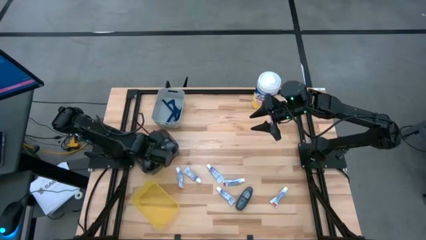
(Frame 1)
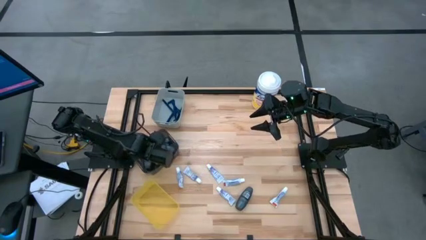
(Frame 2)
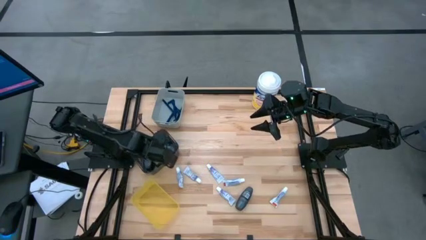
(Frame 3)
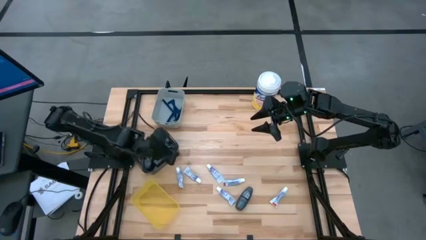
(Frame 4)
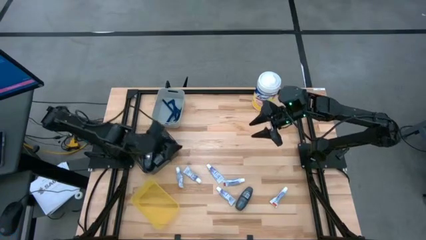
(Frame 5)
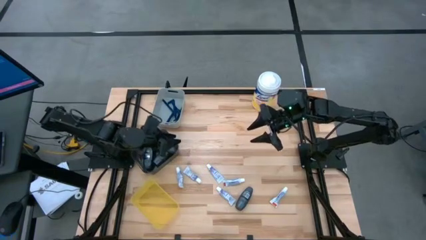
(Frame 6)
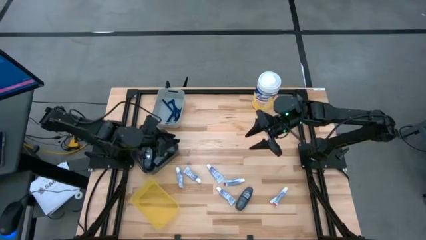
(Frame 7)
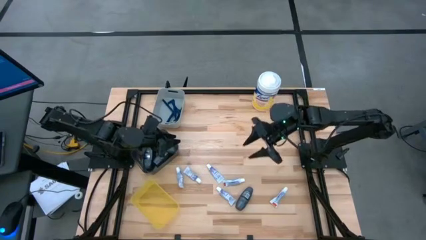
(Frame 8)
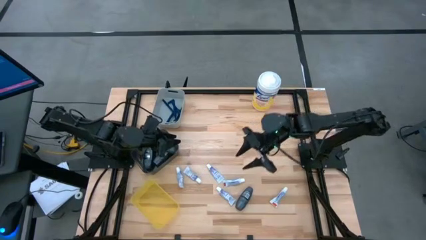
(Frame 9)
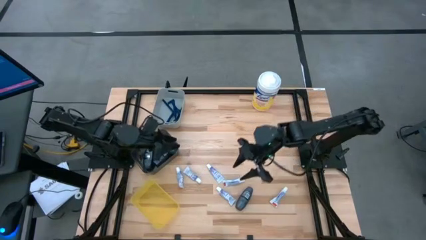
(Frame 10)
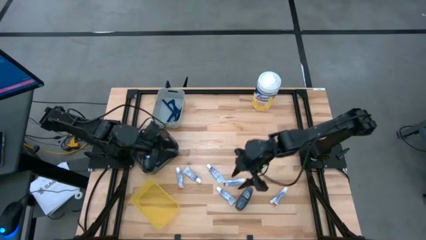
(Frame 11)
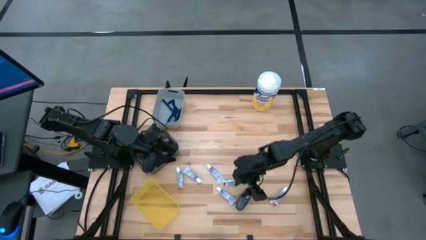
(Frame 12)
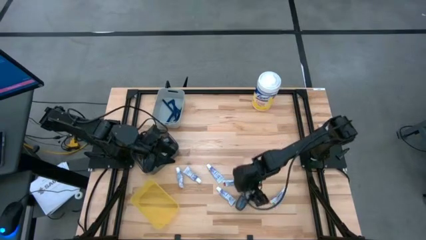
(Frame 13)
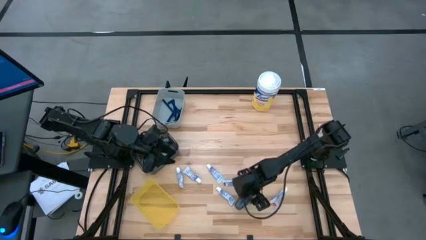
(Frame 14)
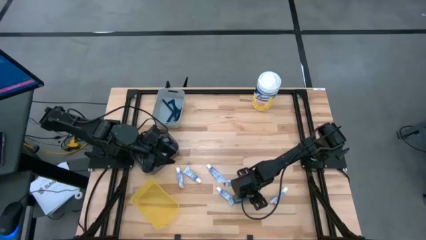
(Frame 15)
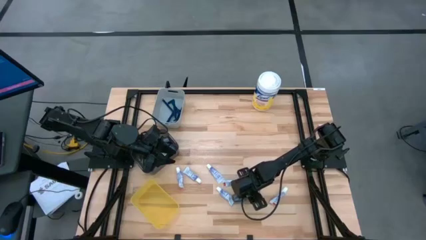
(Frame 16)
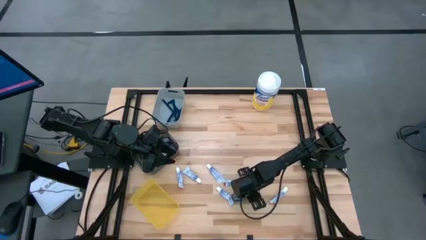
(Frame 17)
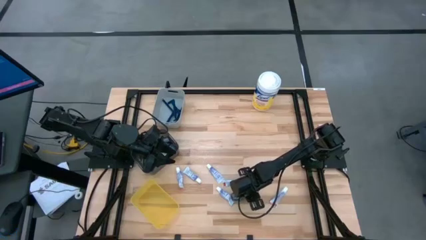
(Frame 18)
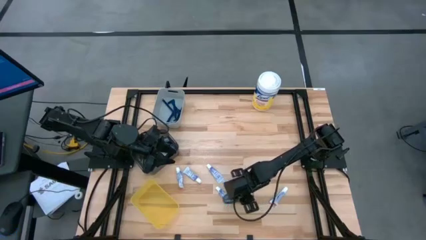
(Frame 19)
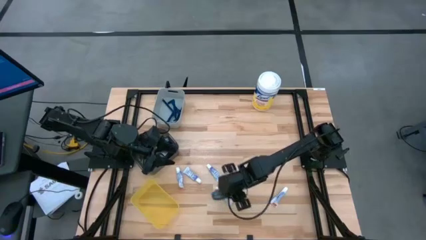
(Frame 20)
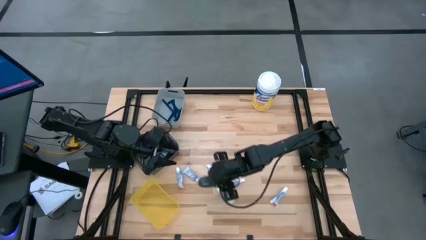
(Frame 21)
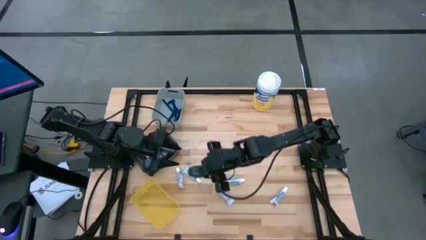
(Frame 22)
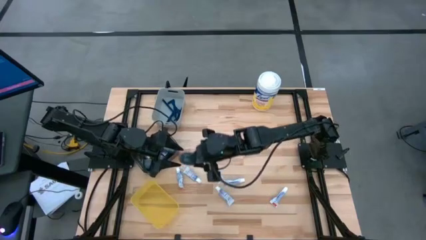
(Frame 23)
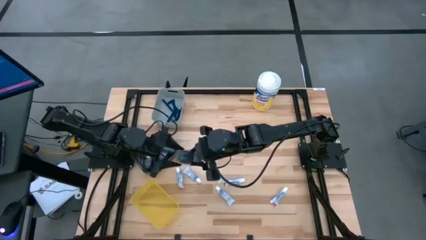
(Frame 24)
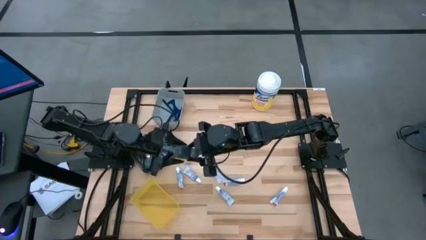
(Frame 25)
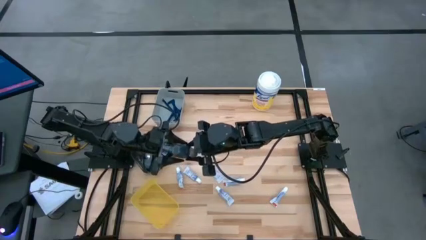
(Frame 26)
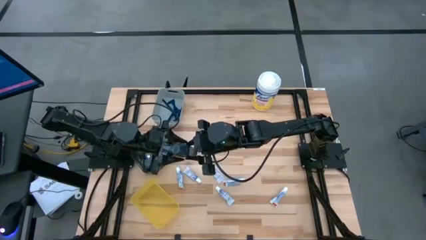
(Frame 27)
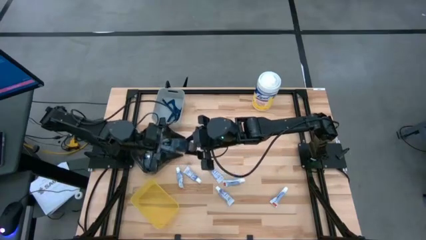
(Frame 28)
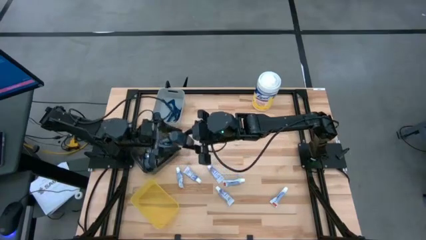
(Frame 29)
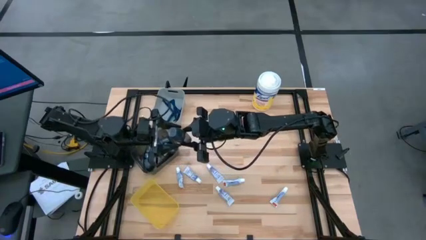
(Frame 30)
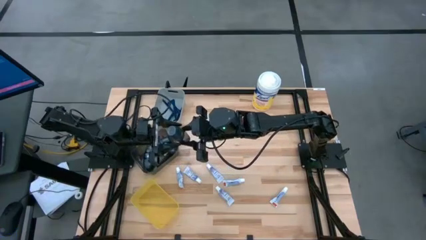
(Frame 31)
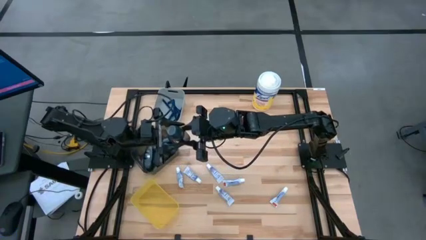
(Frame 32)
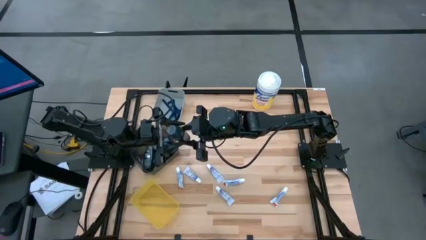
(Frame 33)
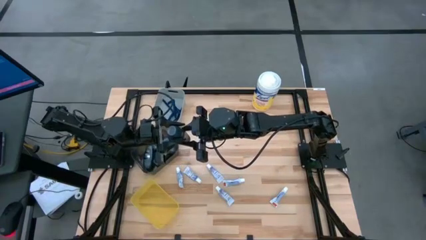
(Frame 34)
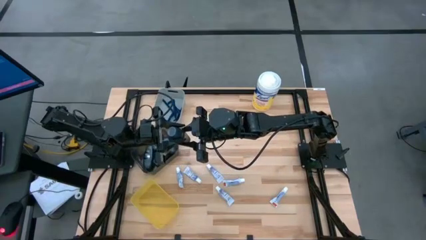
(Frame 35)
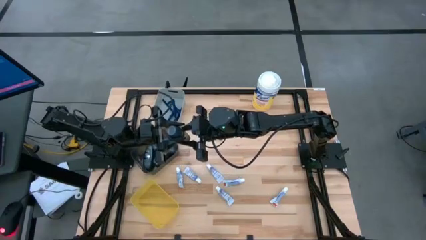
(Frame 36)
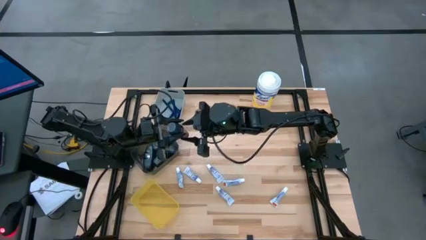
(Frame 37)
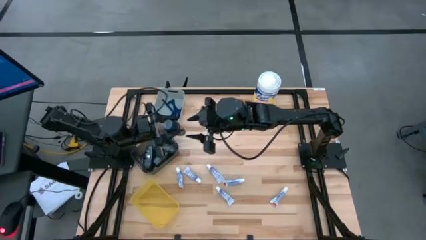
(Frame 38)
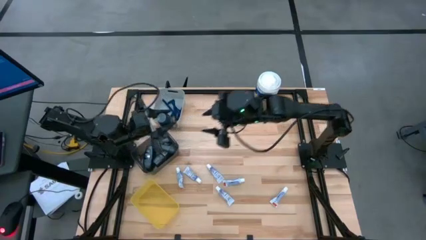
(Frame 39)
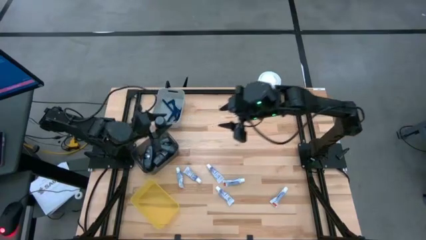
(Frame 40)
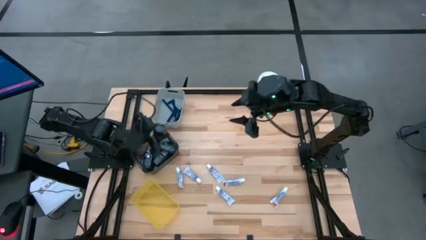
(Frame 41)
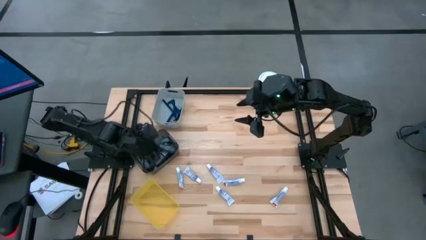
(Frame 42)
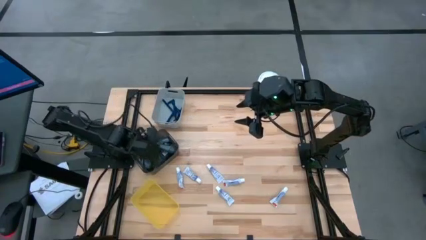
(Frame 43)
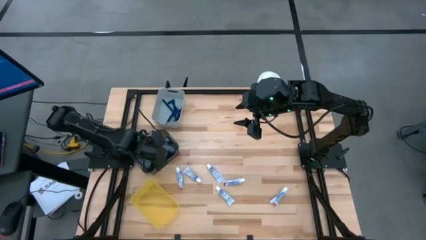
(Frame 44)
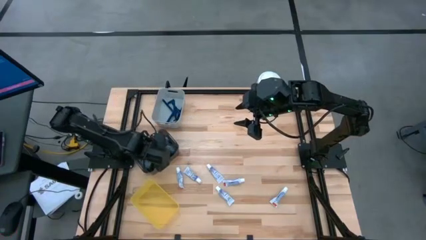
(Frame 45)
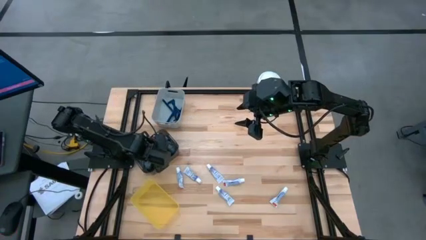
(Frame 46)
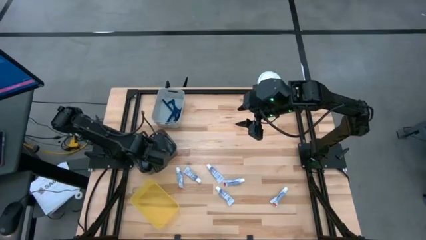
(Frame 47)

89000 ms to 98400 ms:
Task: Pick & Place Travel size toiletries
Put the deodorant into the black bin

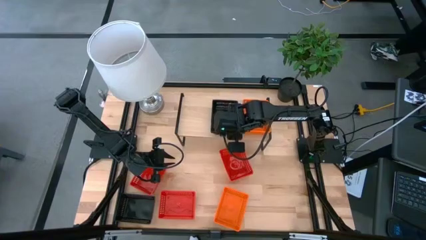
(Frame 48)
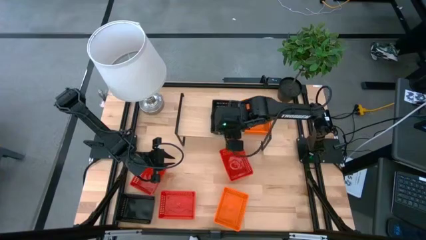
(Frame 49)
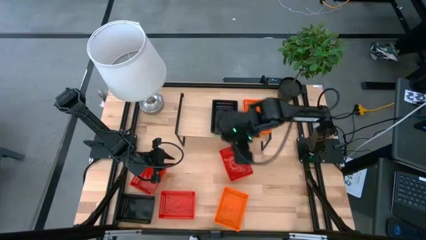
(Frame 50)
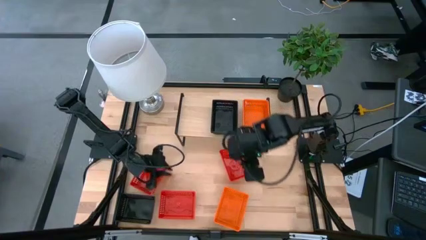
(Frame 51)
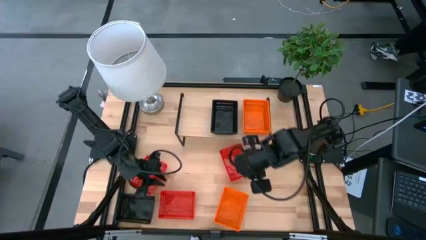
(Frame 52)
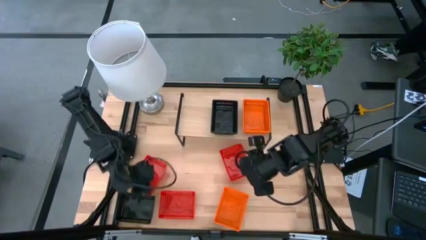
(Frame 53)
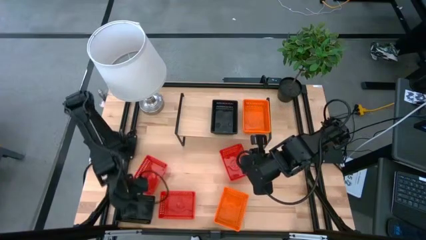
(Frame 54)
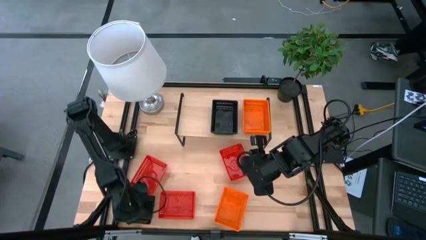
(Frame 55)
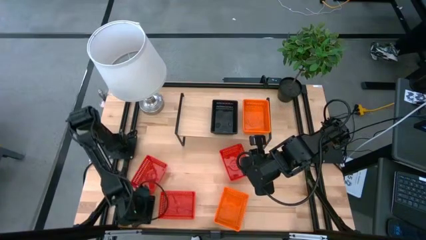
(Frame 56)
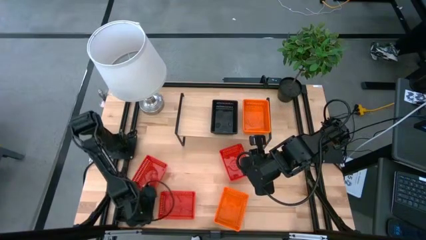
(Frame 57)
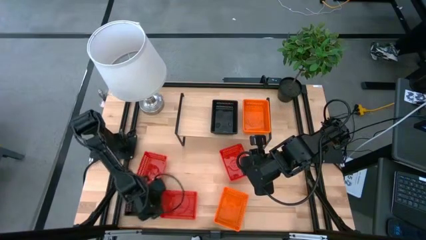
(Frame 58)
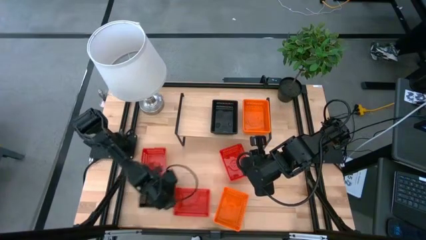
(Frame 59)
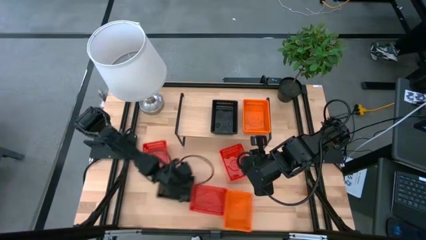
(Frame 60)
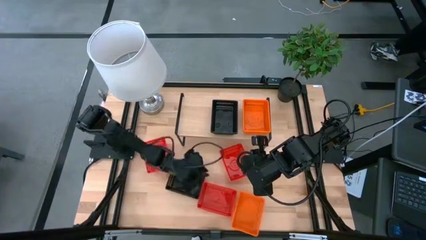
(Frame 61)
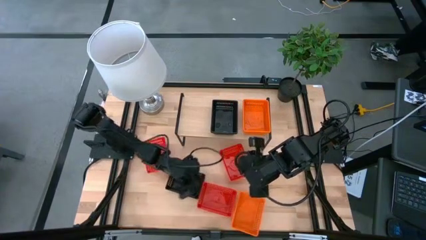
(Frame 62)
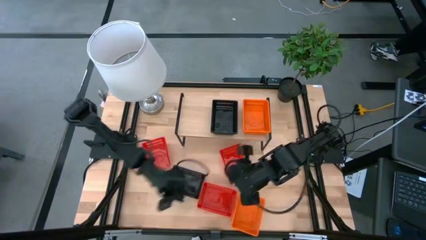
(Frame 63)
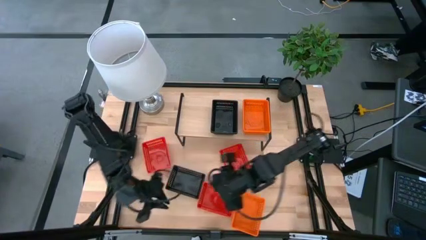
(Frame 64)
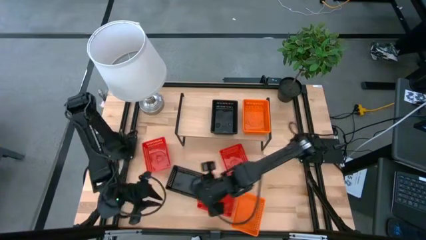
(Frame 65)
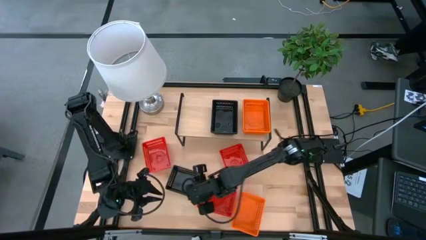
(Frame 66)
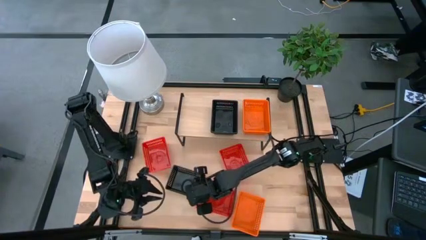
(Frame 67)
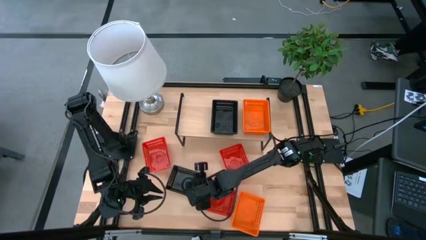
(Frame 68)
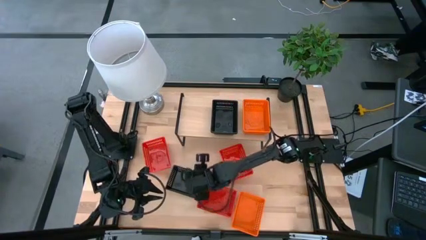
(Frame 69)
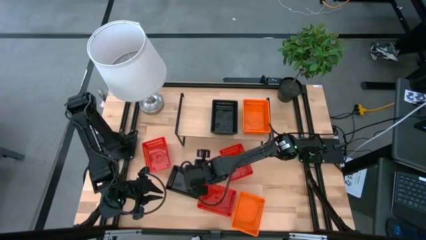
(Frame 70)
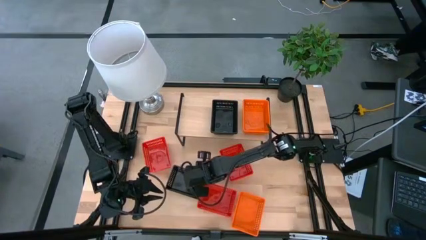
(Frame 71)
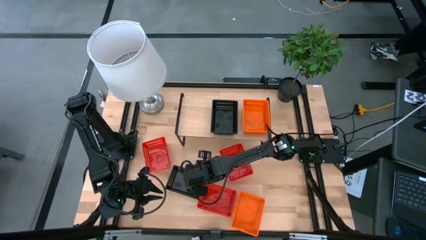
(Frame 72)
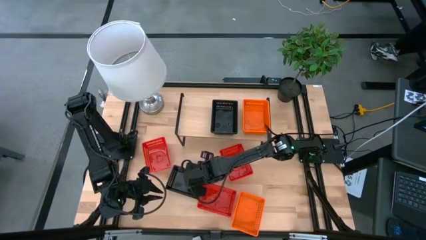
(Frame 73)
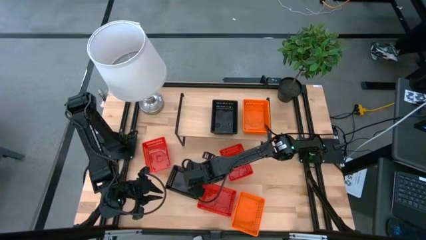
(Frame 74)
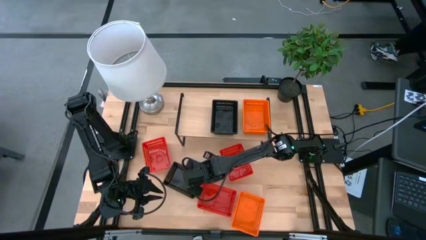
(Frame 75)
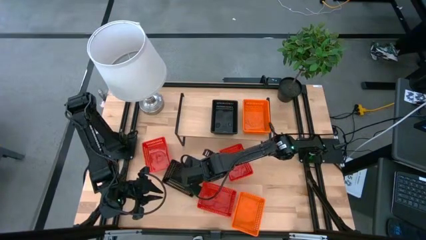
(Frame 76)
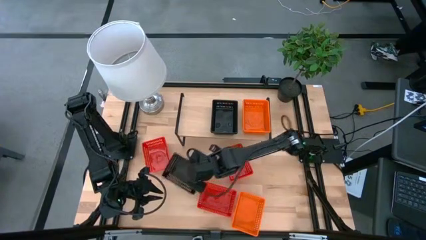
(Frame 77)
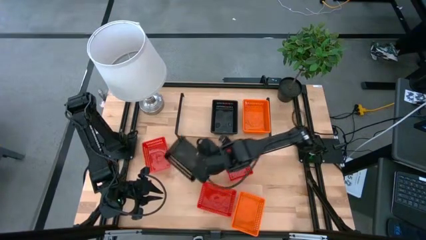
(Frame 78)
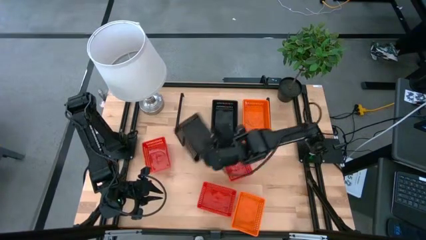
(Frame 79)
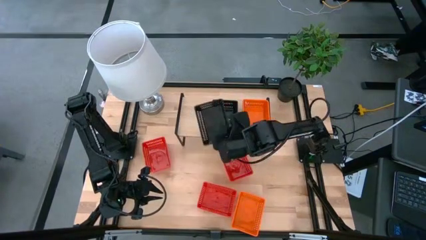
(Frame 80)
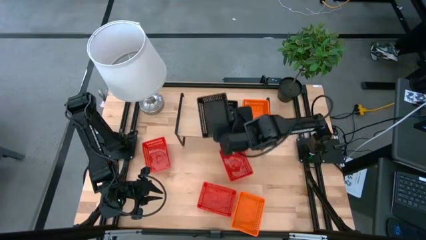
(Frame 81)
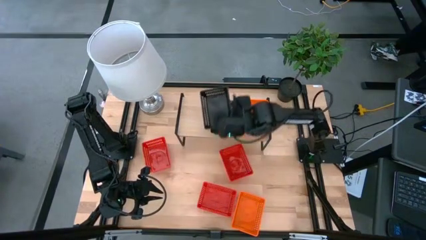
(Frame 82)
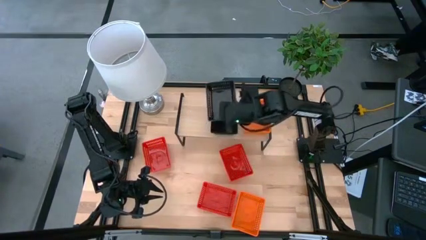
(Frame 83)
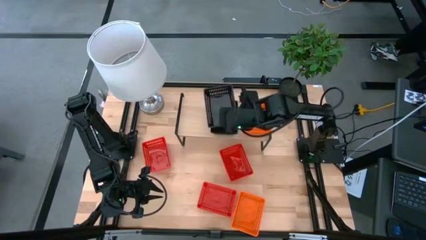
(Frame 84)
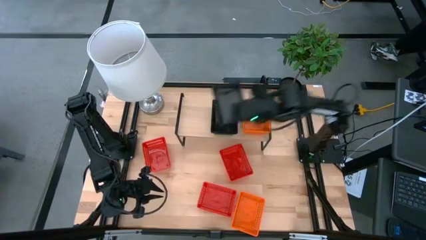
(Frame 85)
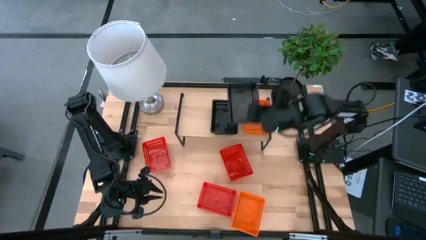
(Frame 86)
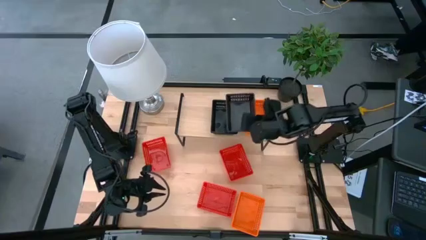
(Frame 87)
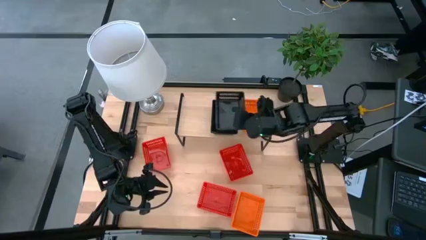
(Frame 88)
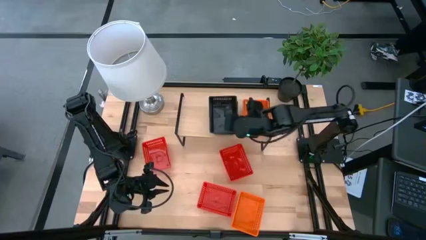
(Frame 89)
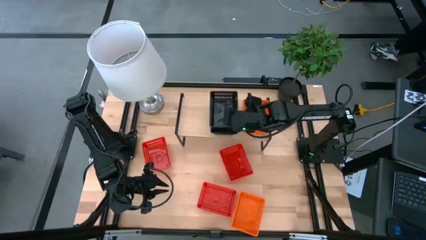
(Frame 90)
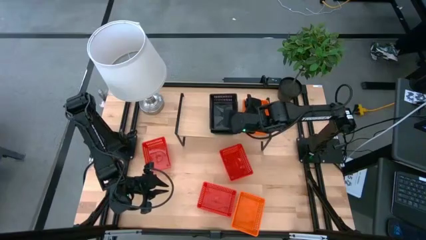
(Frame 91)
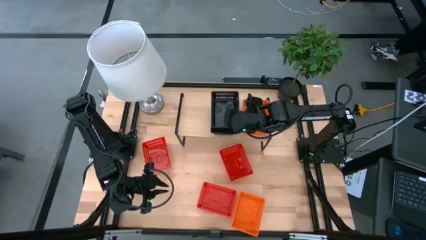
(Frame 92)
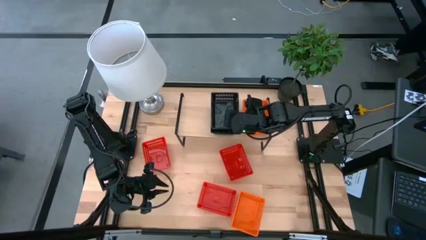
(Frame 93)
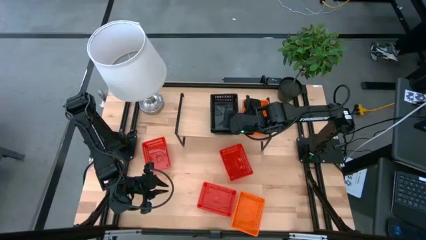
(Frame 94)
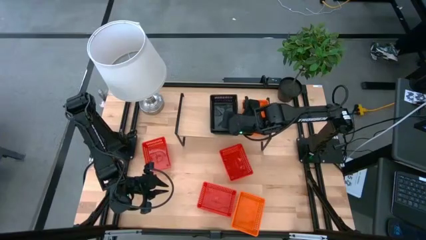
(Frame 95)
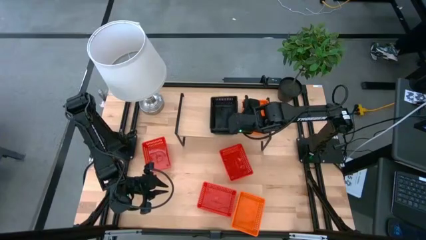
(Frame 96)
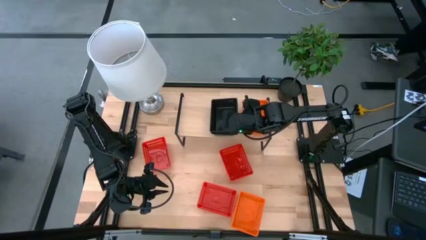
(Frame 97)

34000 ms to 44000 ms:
Task: Stack baskets on shelf by color
Stack the black bin on top of the black bin
